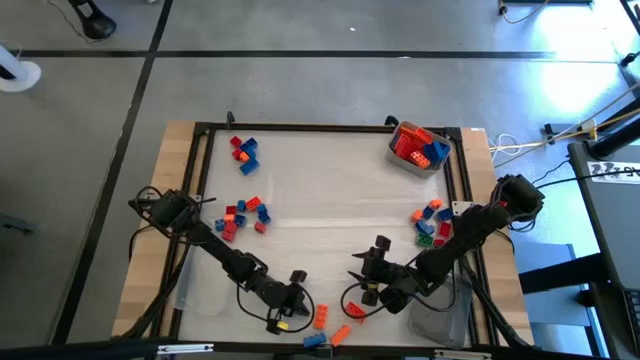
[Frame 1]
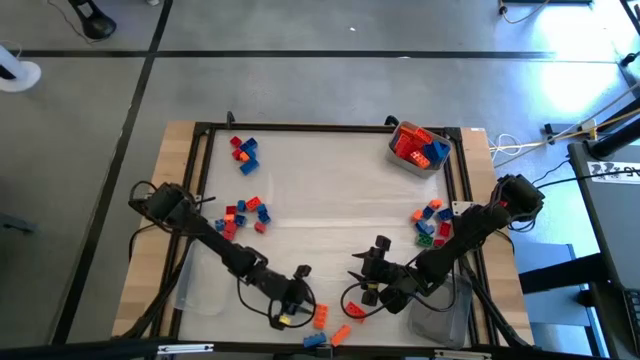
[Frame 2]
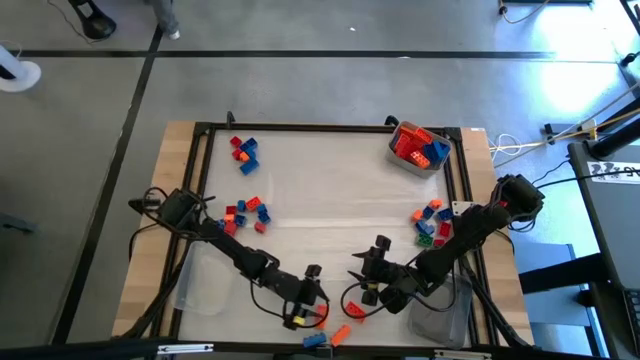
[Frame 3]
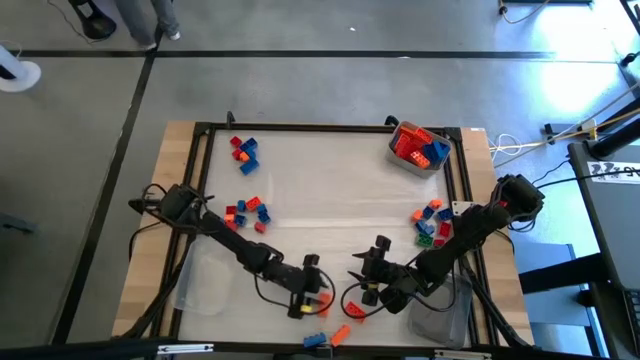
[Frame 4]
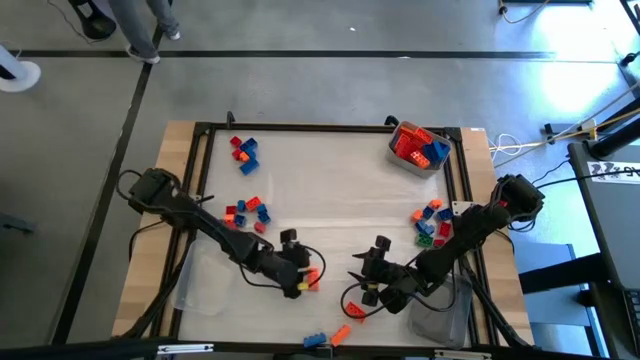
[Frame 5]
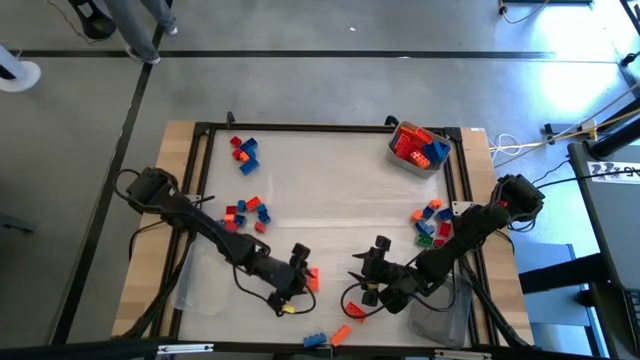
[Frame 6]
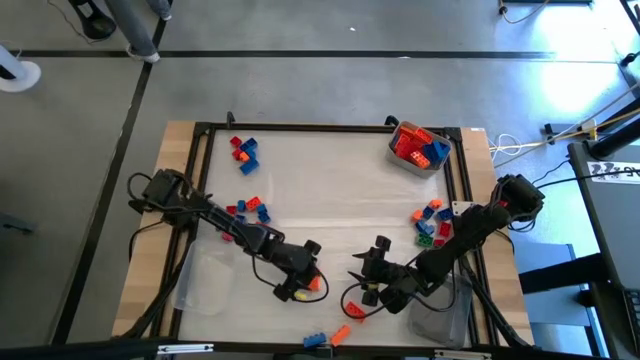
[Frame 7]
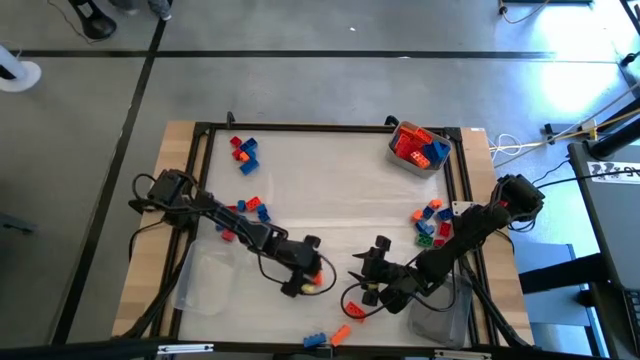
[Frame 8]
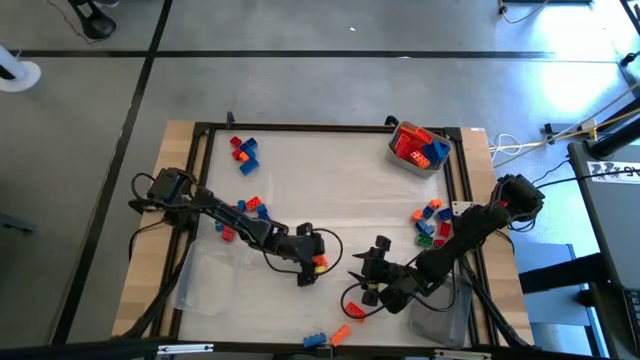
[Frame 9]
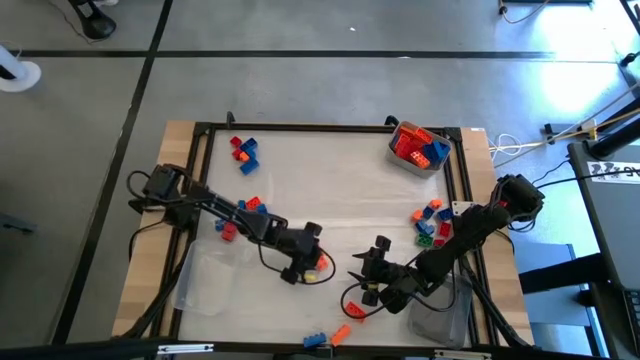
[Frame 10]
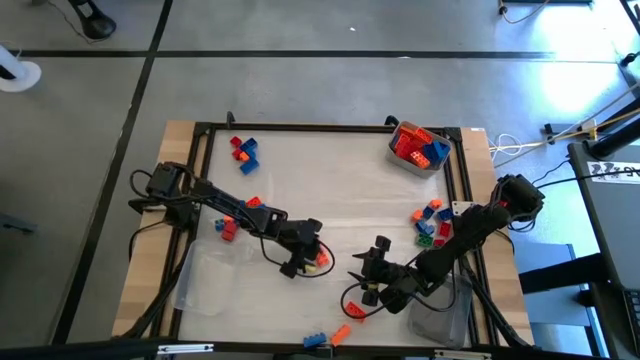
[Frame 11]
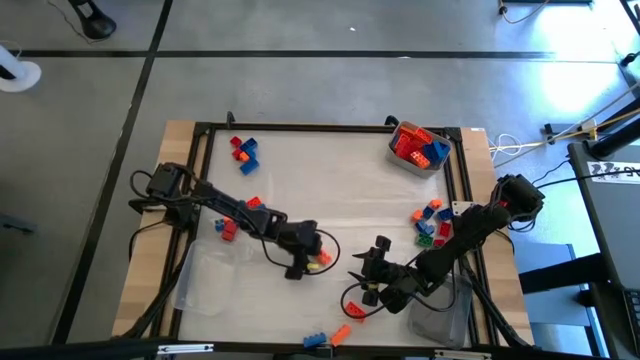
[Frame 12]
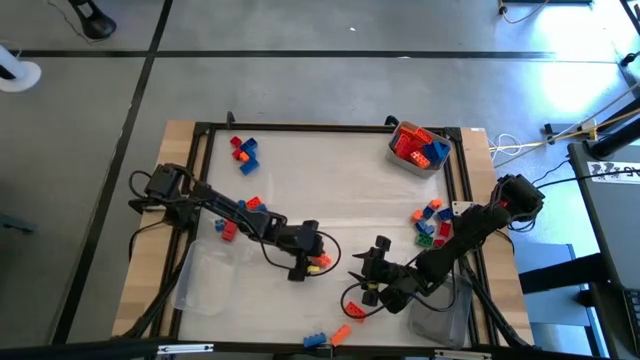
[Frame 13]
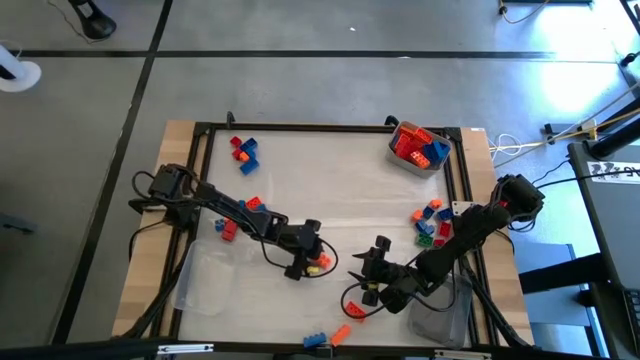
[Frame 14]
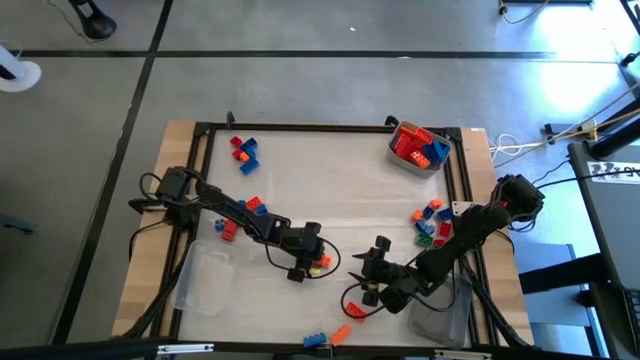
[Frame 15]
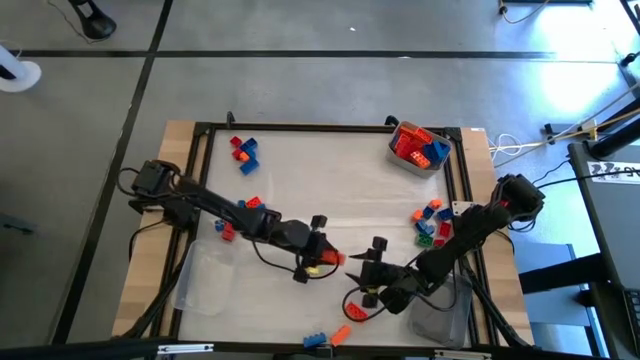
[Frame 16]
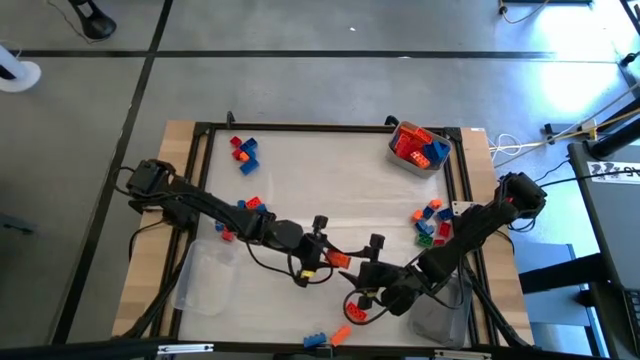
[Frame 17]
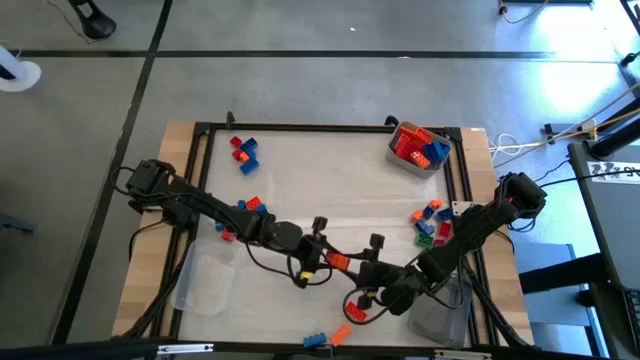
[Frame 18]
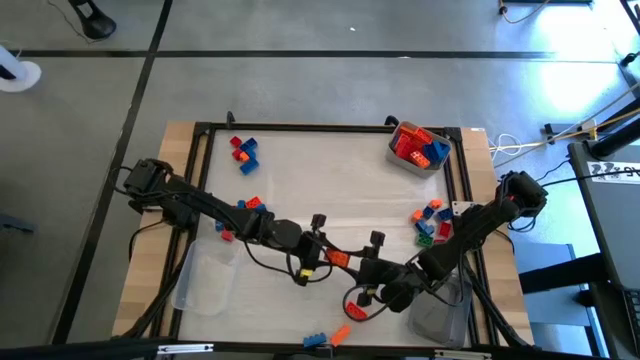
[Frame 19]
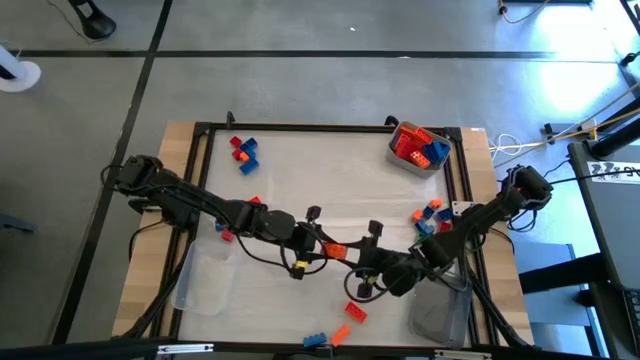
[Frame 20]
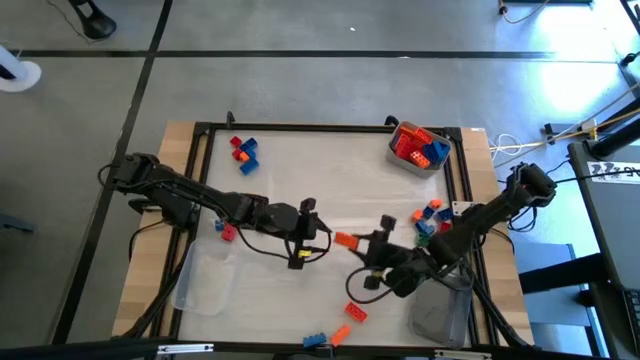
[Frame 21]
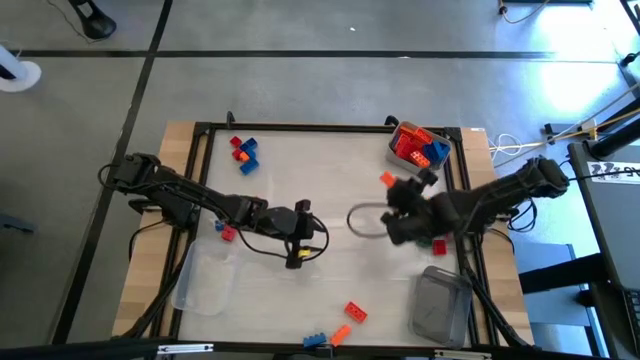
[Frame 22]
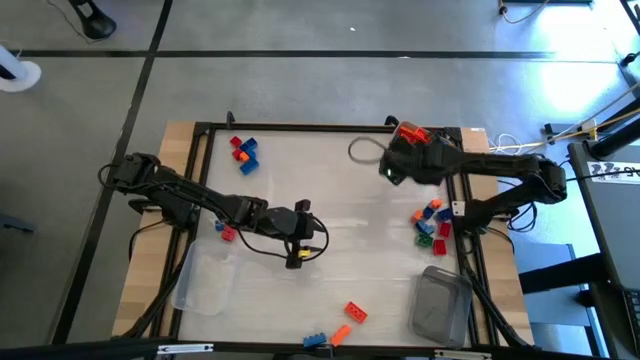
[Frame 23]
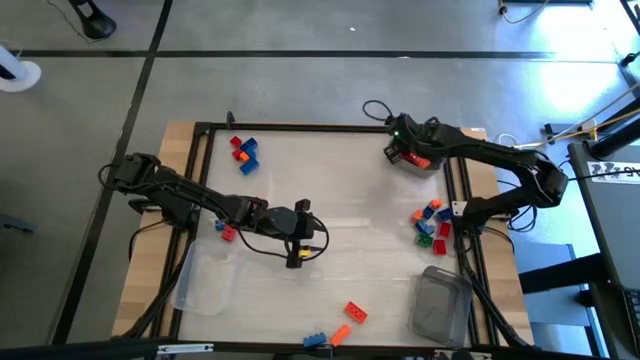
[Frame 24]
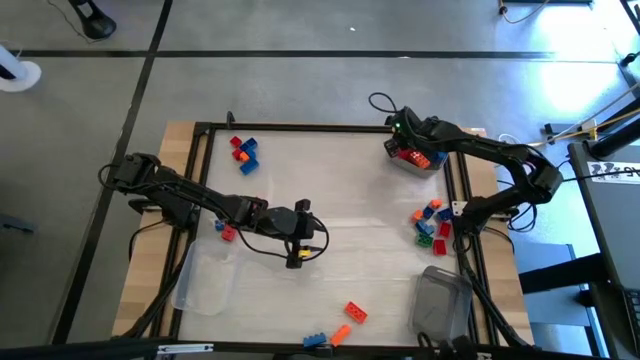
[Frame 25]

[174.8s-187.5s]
Task: Sort blocks by size
Put the orange game piece into the gray bin

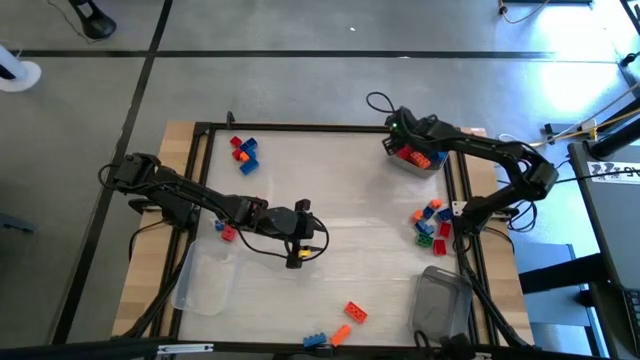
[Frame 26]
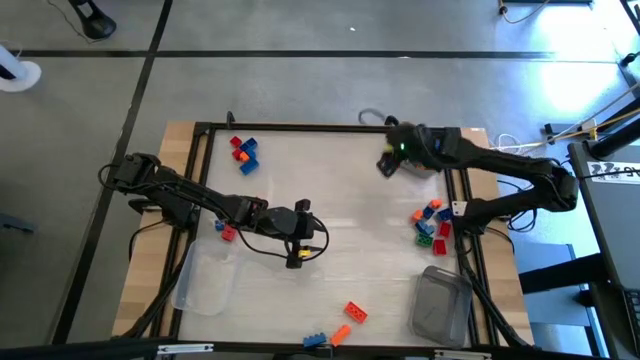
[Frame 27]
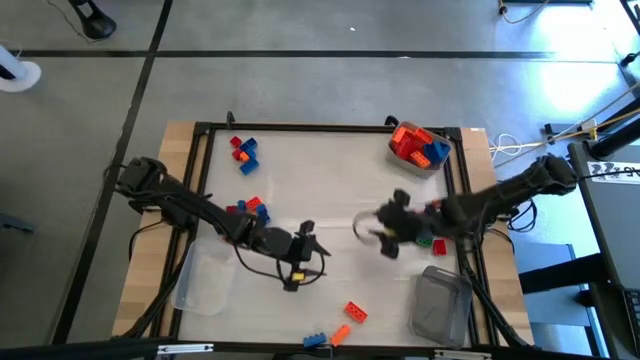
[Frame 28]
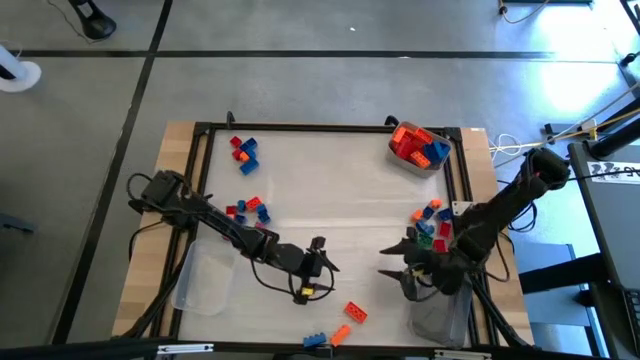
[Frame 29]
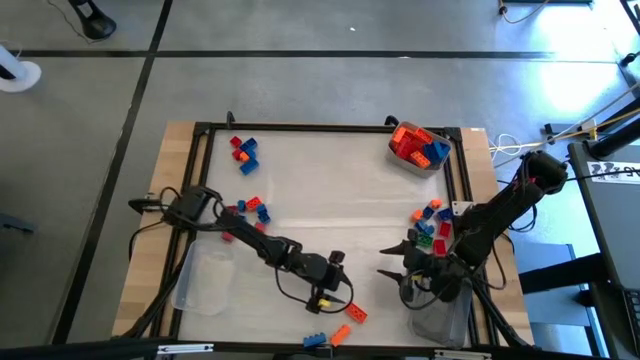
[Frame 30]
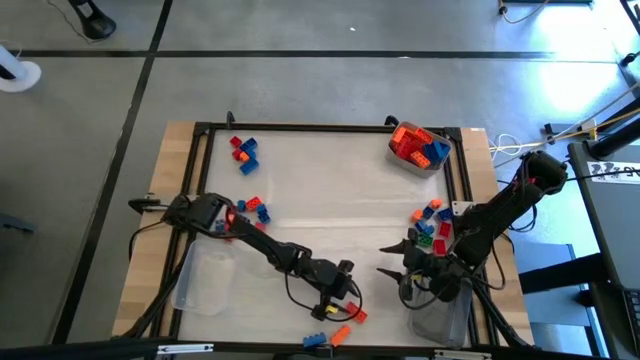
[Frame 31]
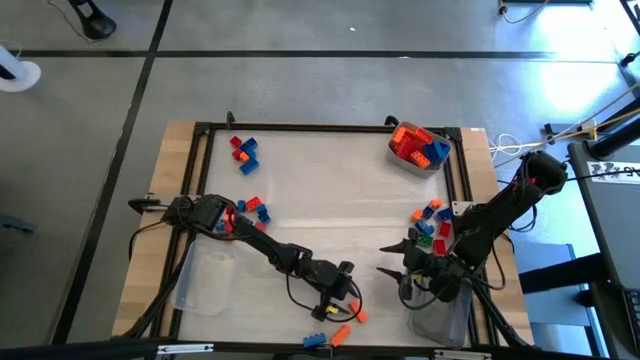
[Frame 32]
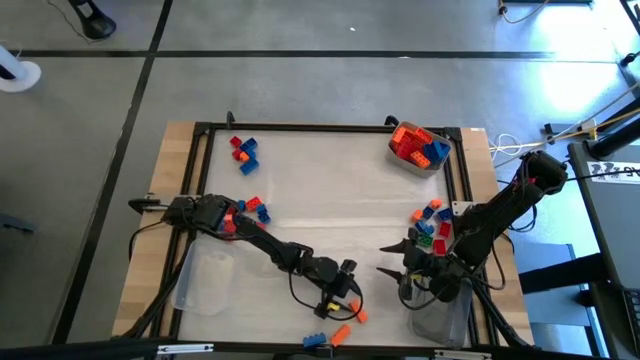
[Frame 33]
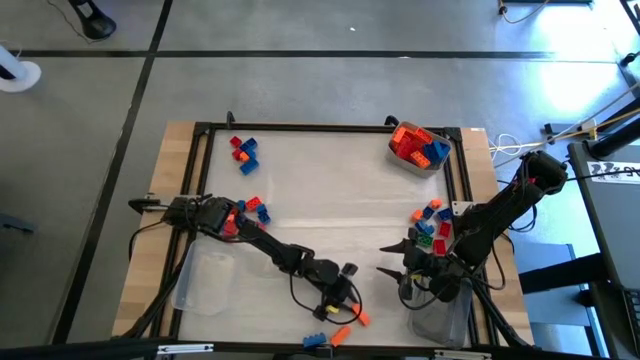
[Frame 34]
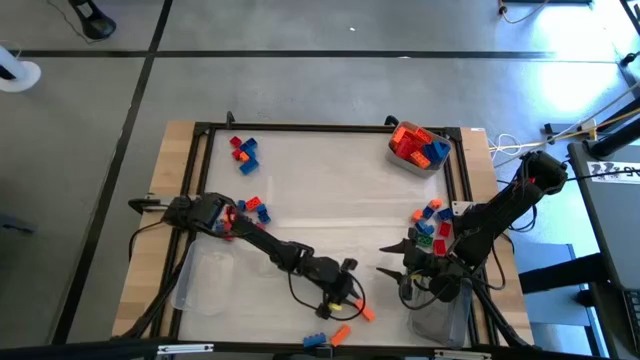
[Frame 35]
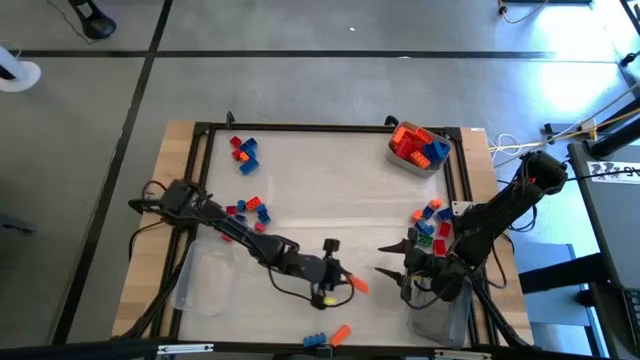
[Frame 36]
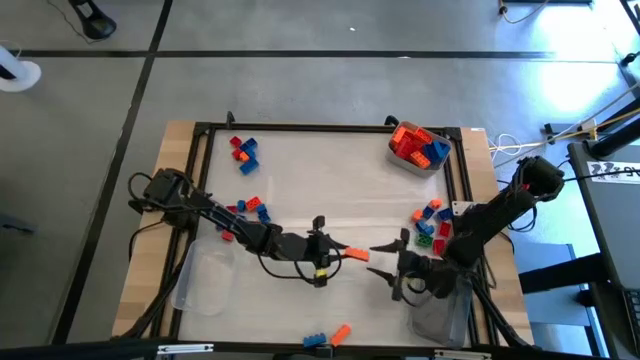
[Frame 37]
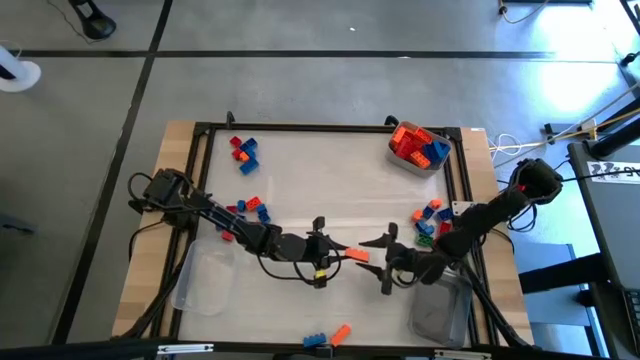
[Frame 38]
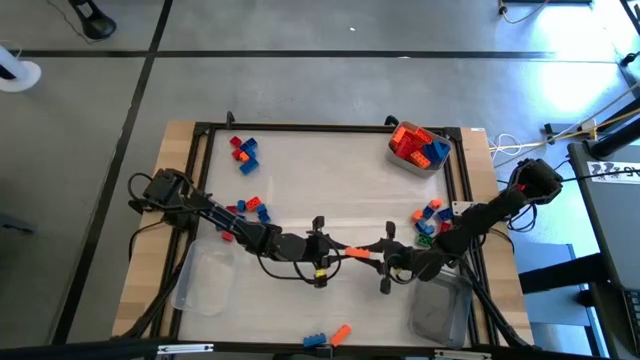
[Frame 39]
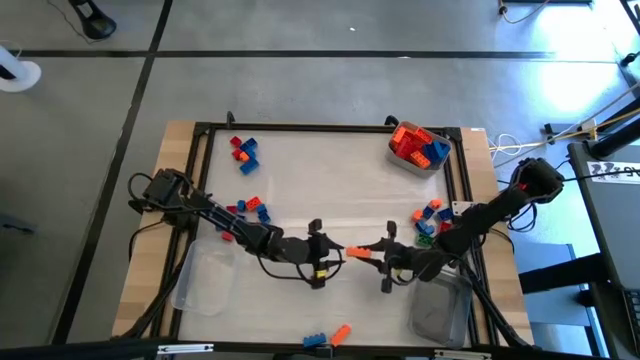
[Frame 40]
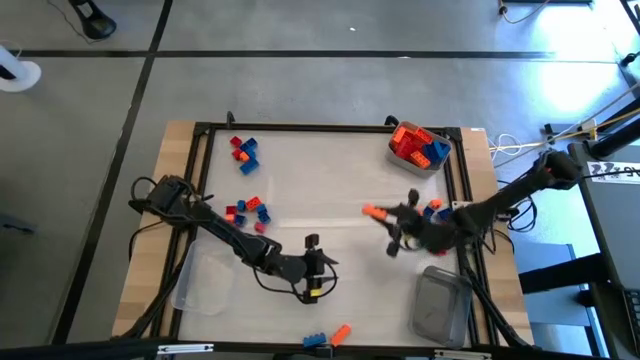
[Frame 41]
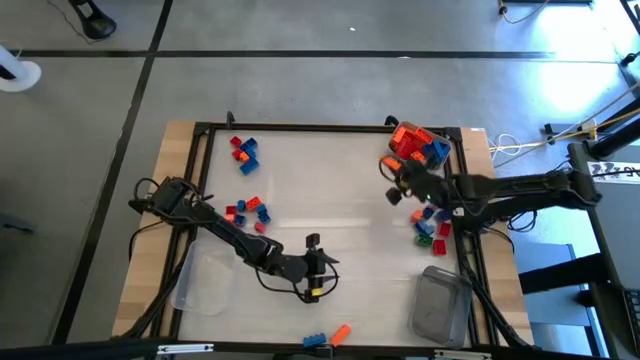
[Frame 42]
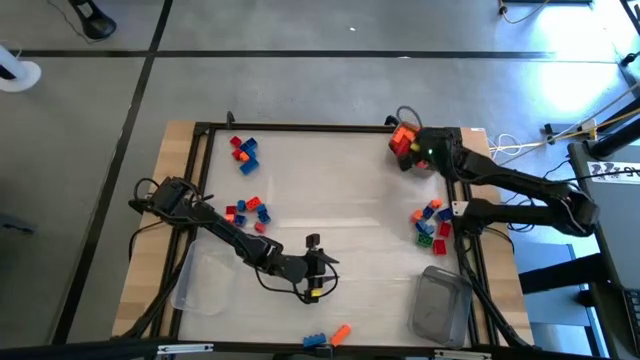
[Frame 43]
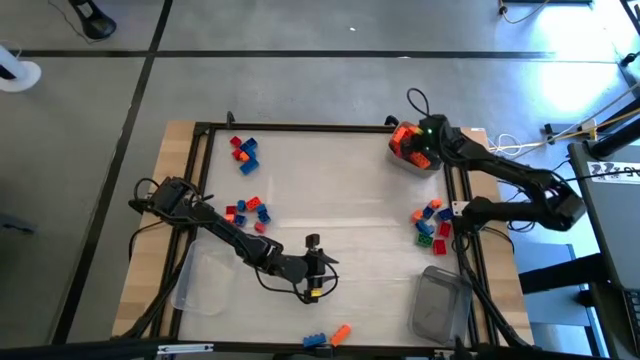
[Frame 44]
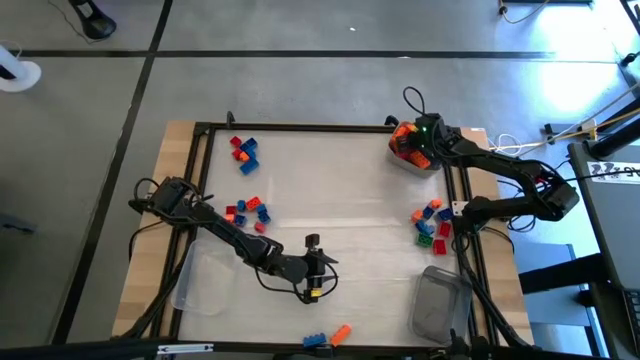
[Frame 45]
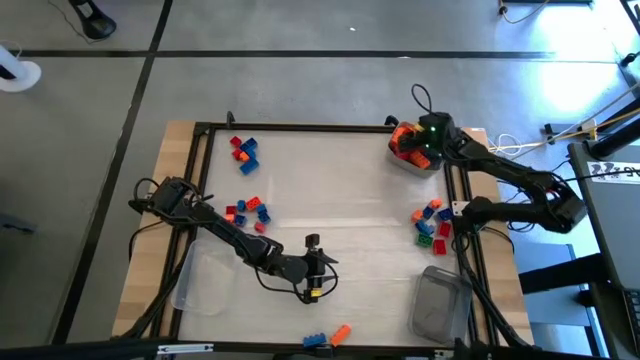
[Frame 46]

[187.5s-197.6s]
Put the orange game piece into the gray bin
